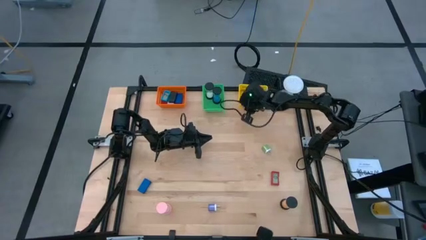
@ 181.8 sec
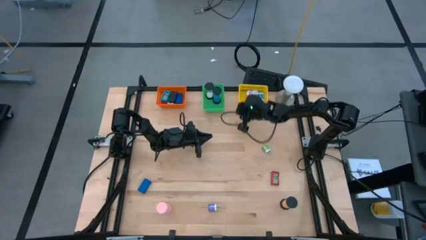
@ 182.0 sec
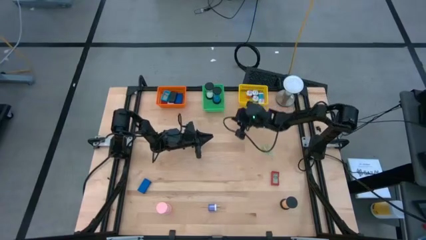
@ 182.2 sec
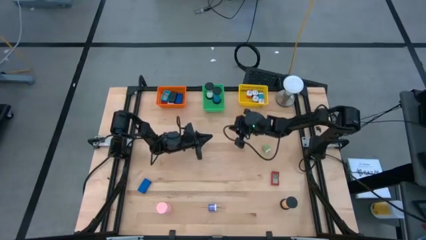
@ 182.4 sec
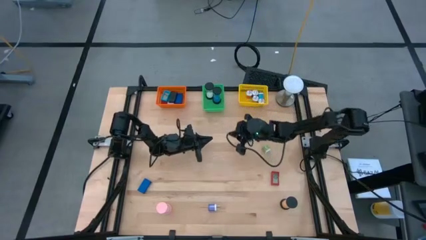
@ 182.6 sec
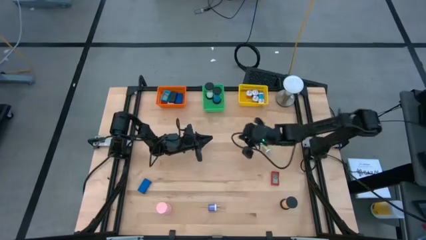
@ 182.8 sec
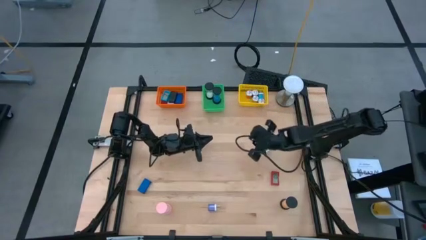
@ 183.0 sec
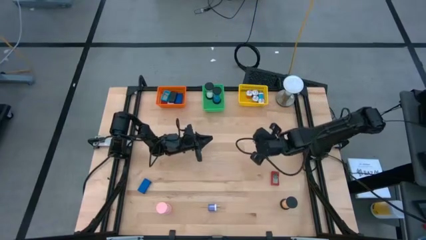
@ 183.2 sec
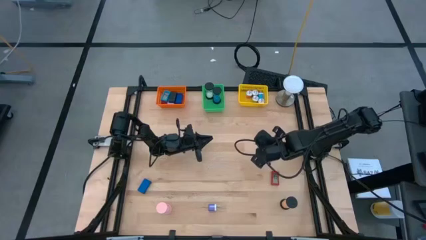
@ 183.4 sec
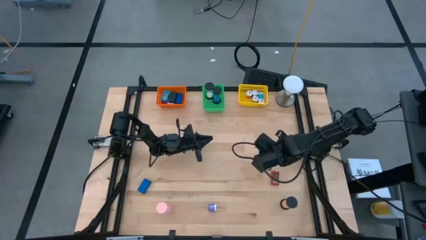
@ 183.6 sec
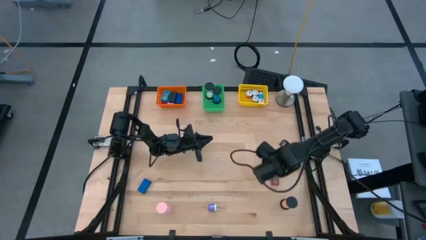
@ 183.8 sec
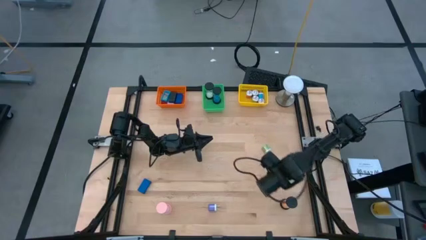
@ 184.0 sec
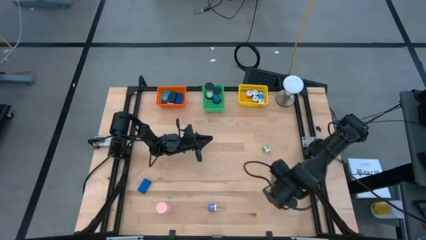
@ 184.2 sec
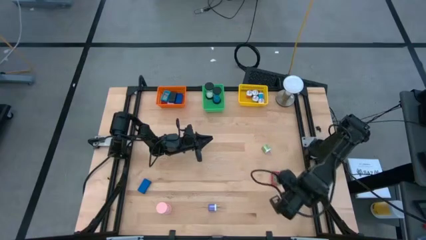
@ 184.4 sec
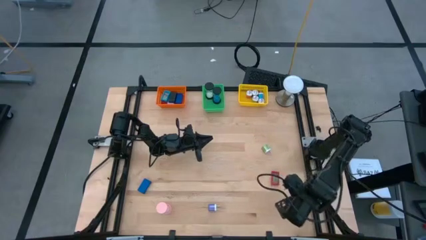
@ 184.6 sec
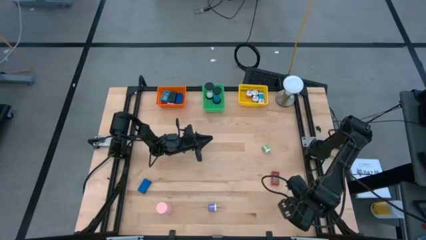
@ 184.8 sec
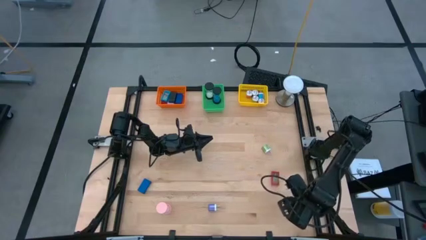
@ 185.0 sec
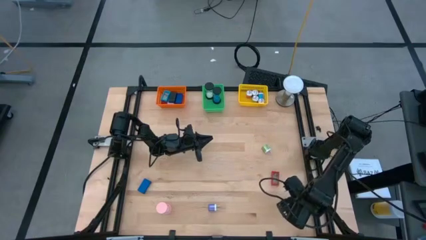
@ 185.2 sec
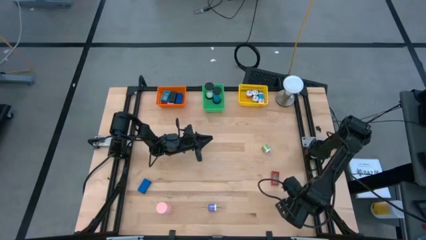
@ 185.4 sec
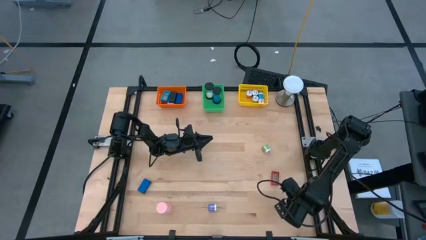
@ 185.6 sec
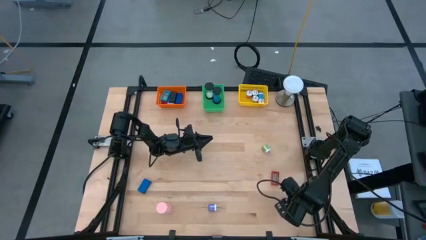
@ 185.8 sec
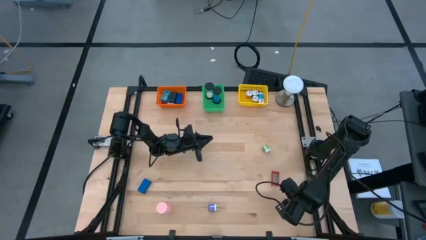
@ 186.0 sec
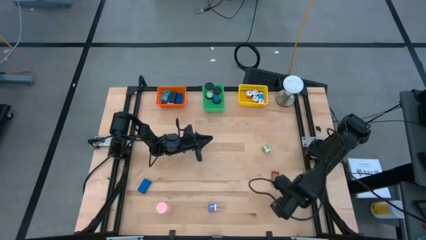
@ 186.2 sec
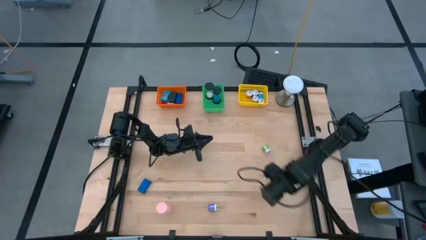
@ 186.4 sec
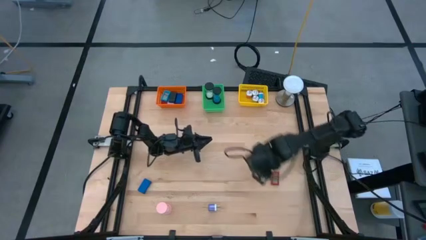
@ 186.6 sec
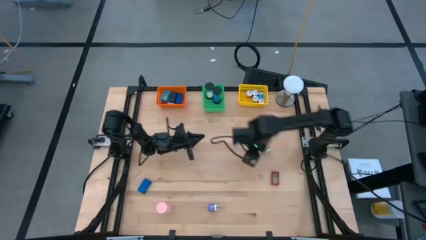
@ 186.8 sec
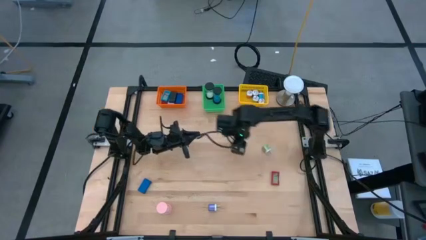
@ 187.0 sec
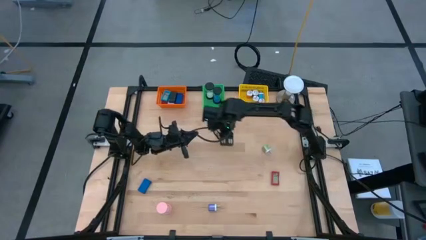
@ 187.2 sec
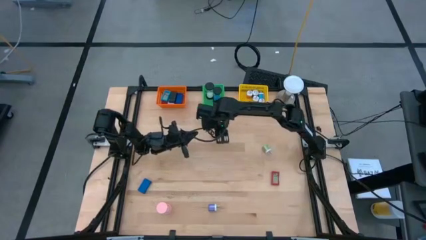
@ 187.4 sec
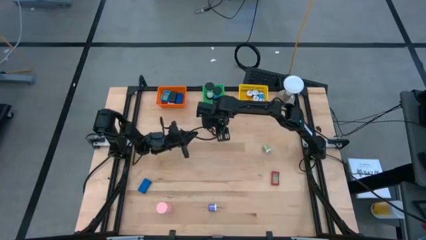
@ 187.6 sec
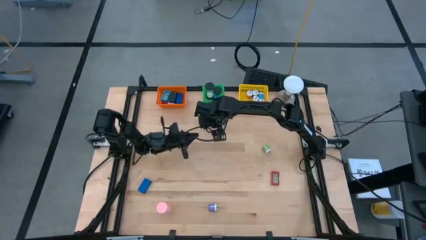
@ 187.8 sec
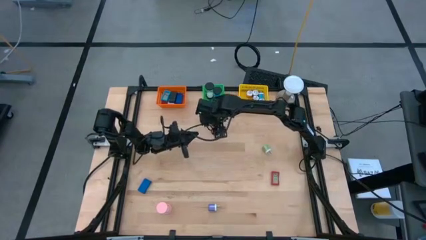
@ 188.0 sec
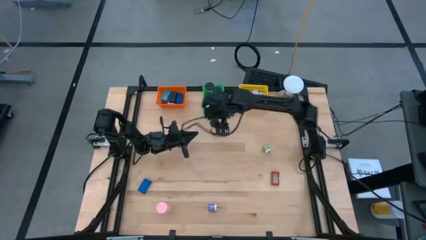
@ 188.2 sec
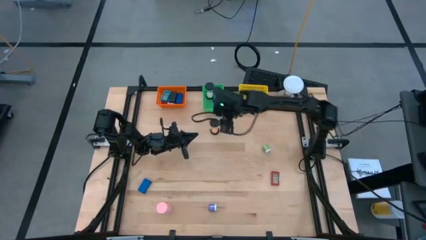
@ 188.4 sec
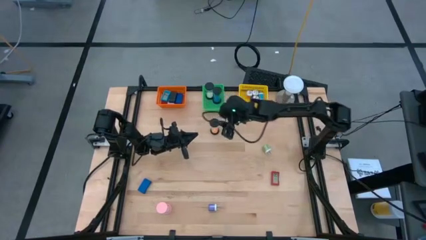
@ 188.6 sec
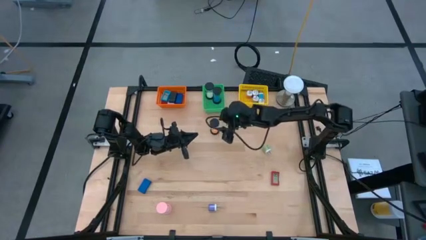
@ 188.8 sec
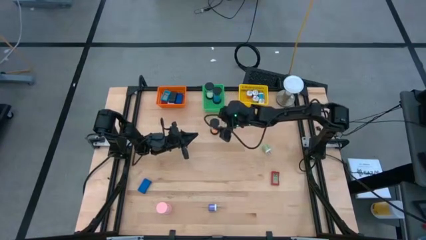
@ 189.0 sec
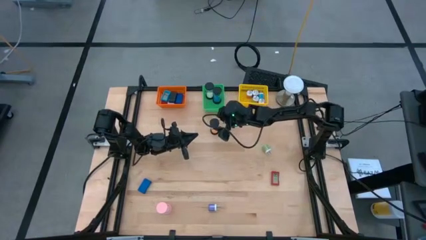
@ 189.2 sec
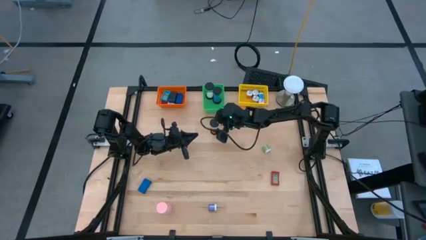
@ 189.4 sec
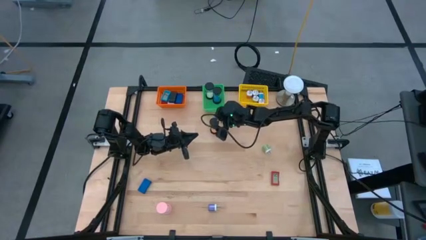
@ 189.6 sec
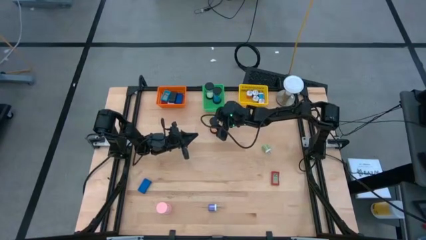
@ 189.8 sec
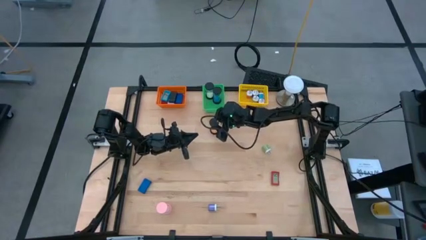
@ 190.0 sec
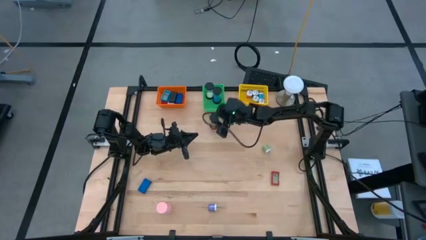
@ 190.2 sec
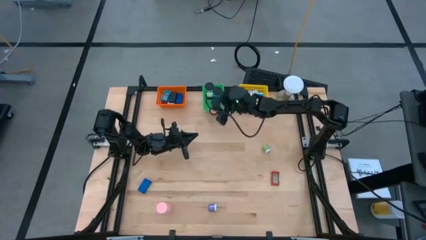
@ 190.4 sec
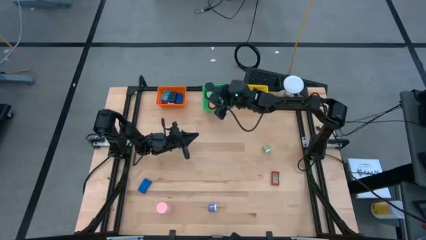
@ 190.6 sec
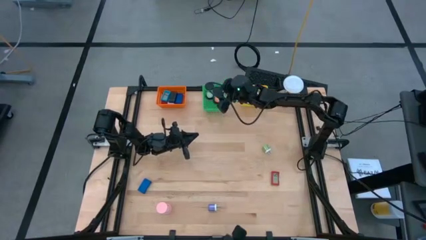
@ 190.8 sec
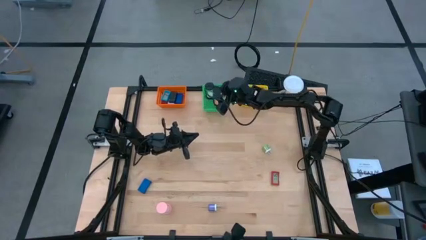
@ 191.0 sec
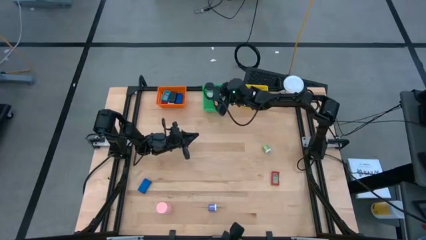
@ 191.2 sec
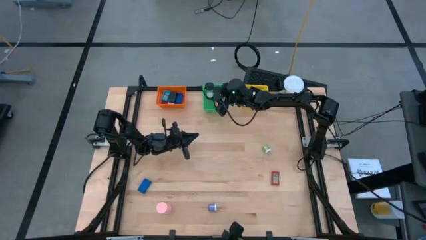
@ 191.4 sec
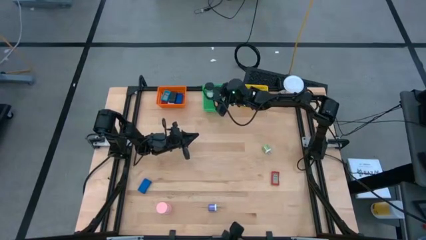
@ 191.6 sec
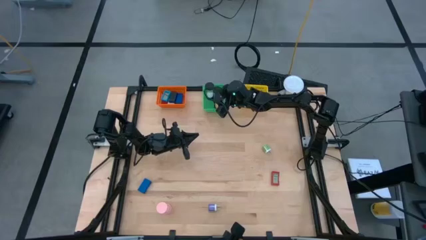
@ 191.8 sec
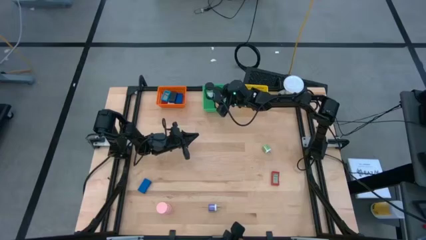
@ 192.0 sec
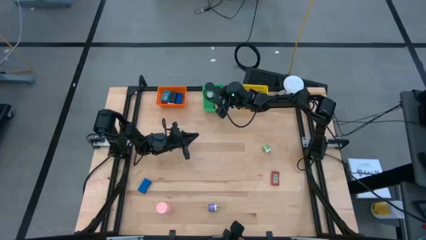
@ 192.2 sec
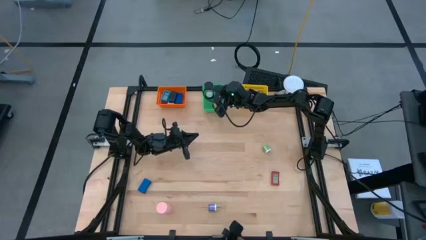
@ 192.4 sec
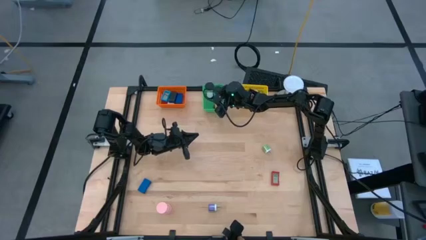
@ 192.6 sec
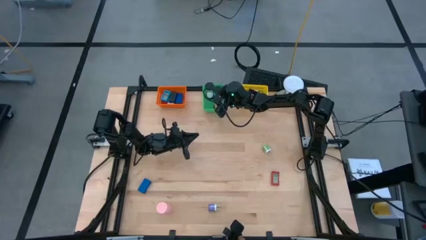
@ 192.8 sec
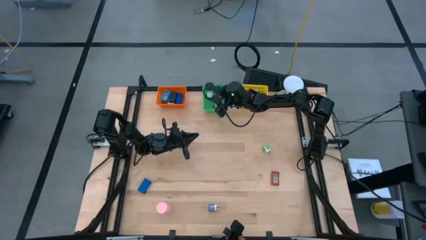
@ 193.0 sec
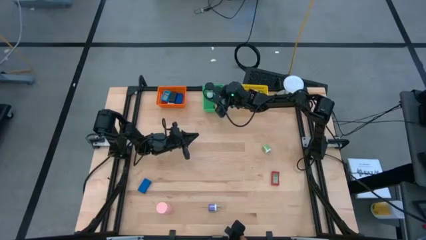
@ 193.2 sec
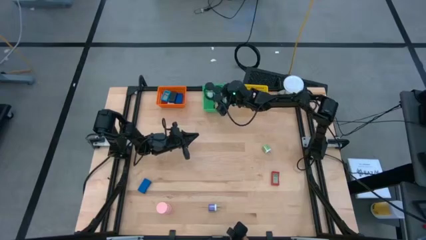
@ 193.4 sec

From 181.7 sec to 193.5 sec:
Task: Pick & Place Office items
Put the orange hourglass into the green bin
